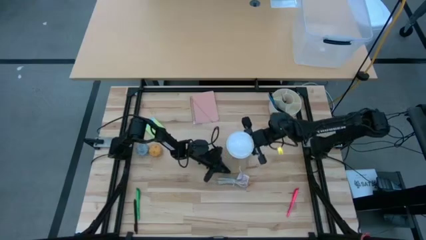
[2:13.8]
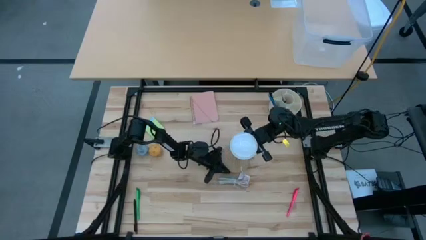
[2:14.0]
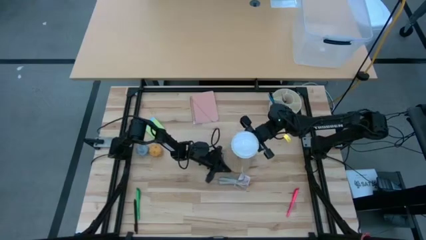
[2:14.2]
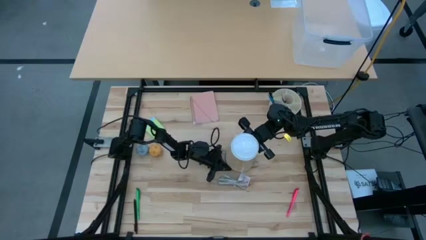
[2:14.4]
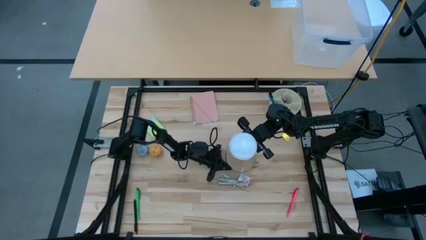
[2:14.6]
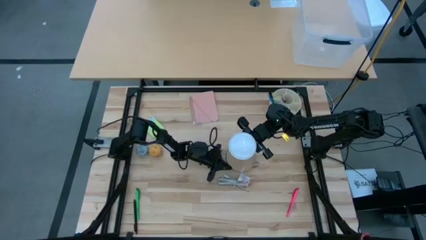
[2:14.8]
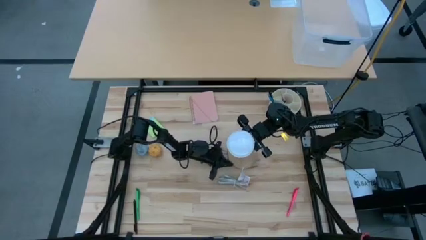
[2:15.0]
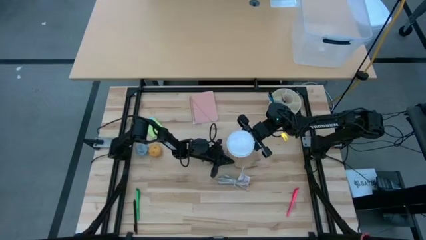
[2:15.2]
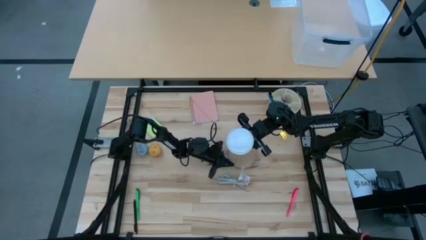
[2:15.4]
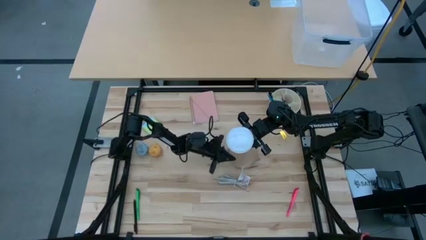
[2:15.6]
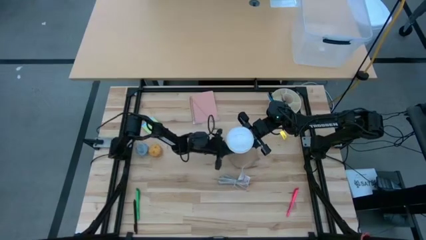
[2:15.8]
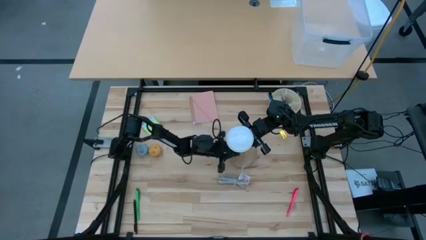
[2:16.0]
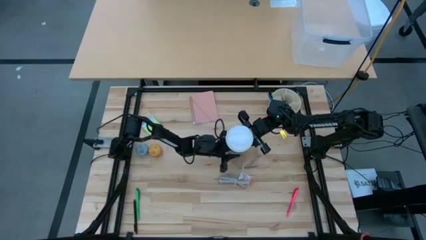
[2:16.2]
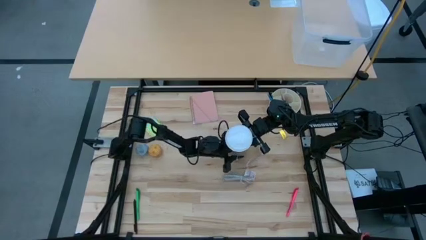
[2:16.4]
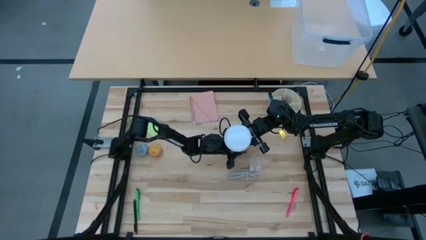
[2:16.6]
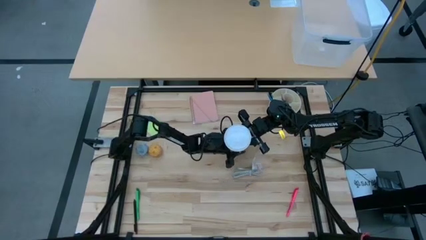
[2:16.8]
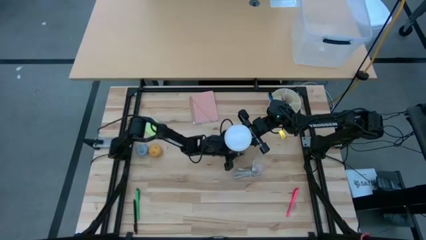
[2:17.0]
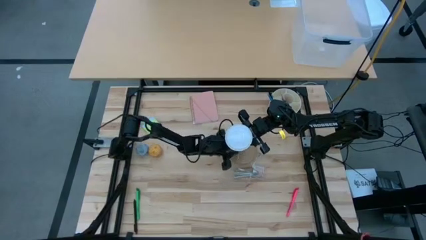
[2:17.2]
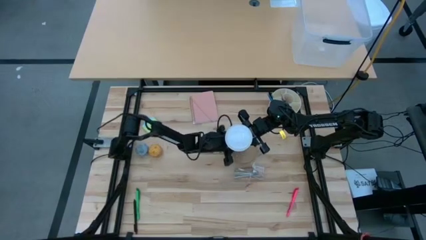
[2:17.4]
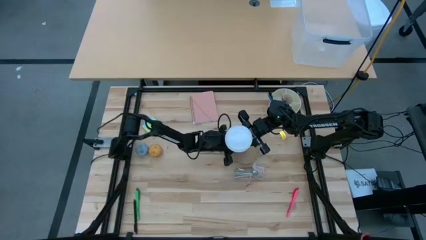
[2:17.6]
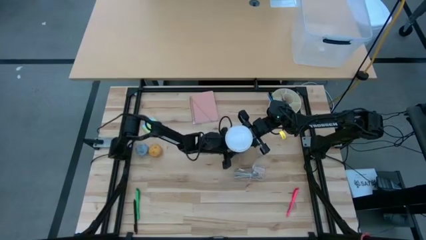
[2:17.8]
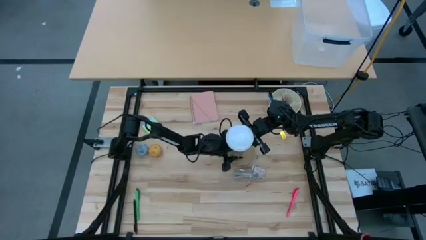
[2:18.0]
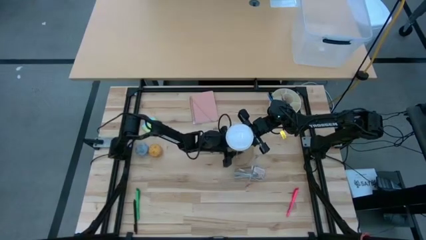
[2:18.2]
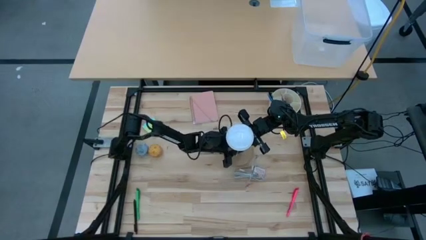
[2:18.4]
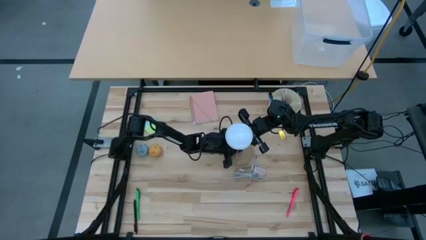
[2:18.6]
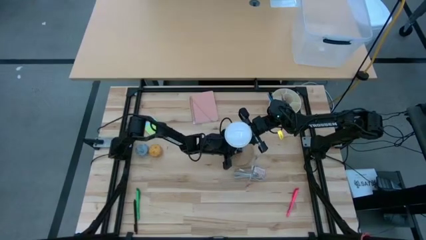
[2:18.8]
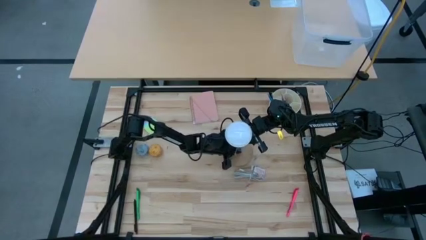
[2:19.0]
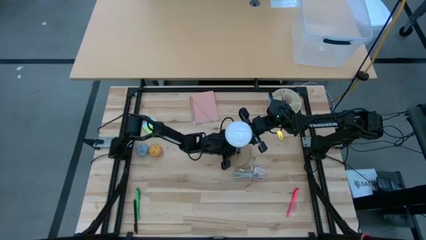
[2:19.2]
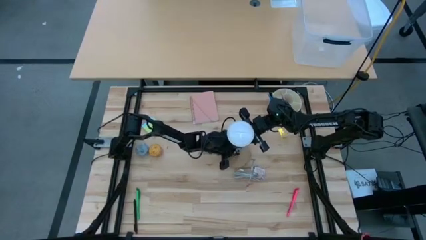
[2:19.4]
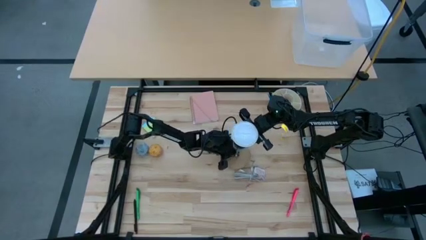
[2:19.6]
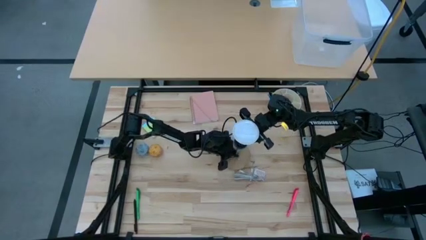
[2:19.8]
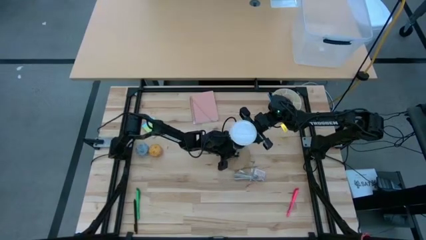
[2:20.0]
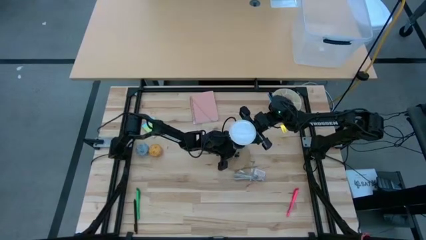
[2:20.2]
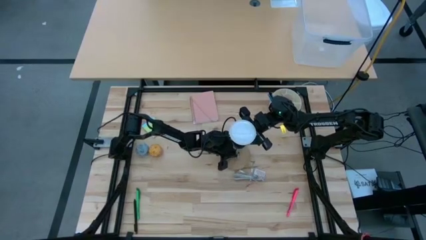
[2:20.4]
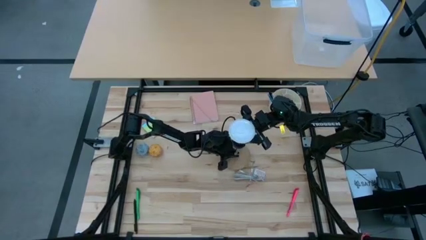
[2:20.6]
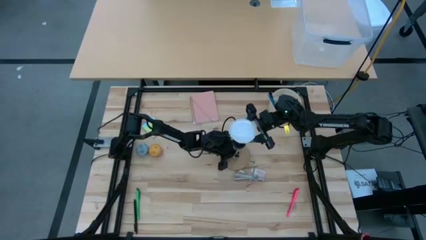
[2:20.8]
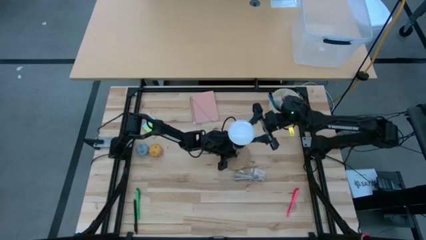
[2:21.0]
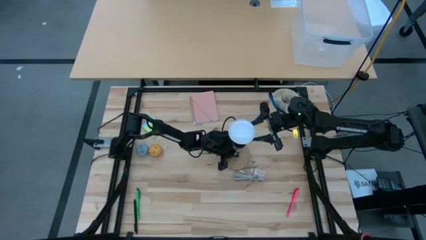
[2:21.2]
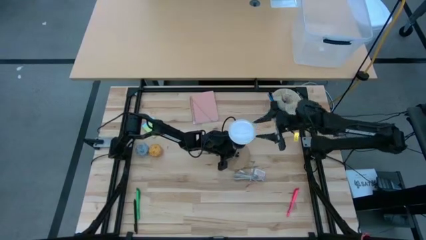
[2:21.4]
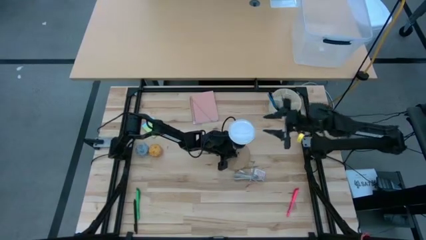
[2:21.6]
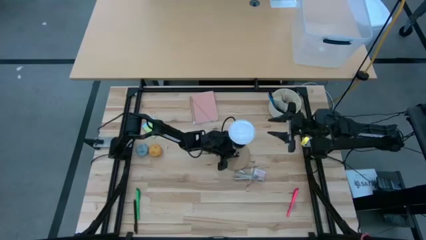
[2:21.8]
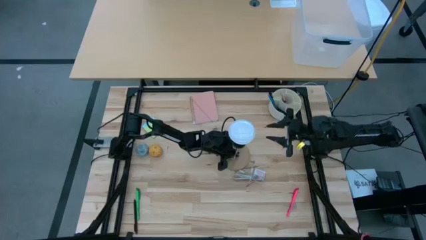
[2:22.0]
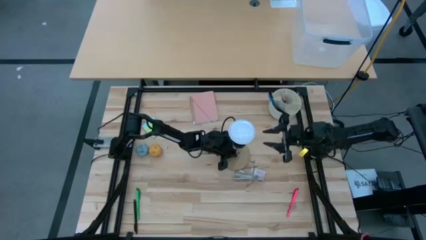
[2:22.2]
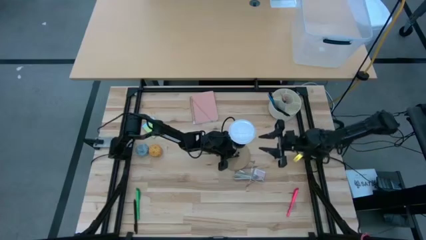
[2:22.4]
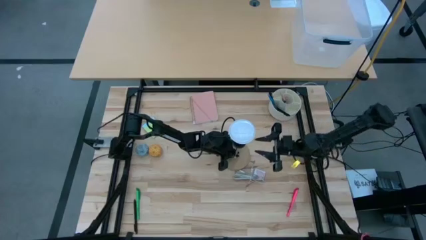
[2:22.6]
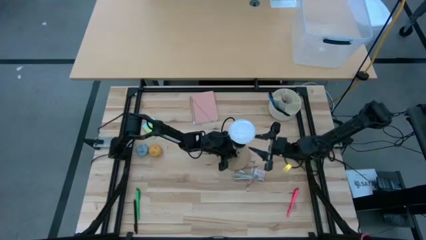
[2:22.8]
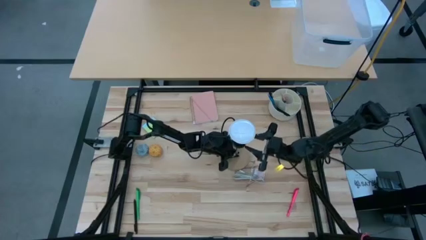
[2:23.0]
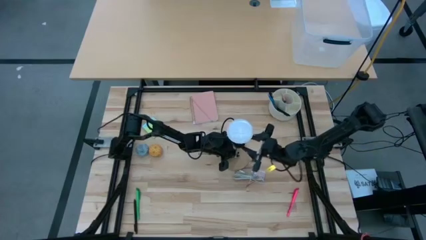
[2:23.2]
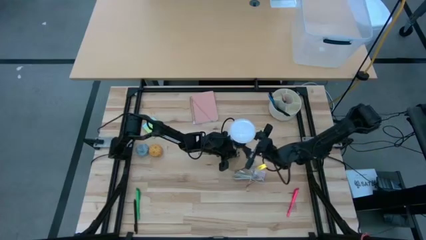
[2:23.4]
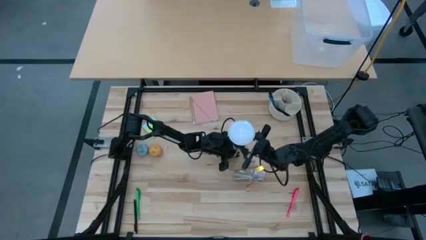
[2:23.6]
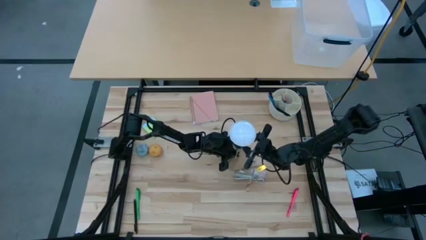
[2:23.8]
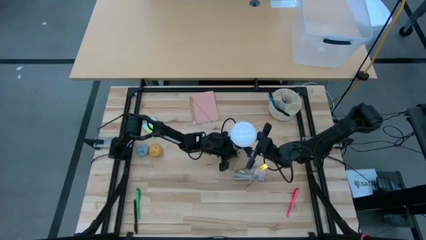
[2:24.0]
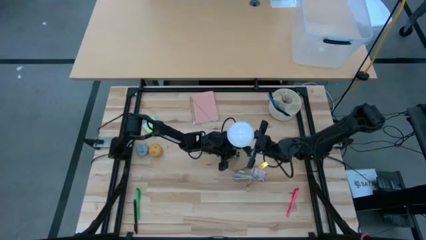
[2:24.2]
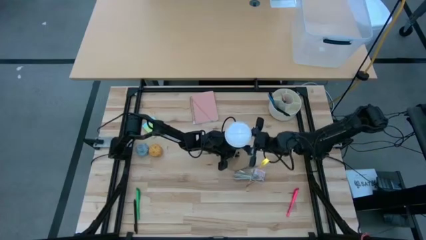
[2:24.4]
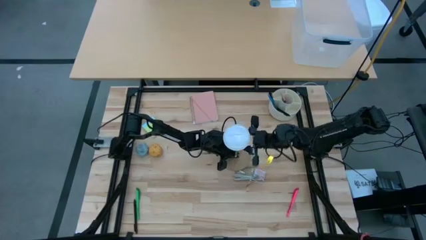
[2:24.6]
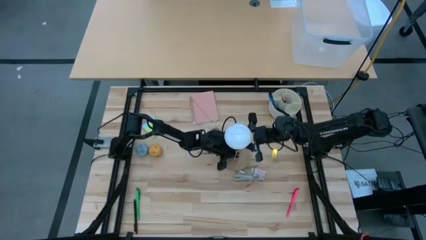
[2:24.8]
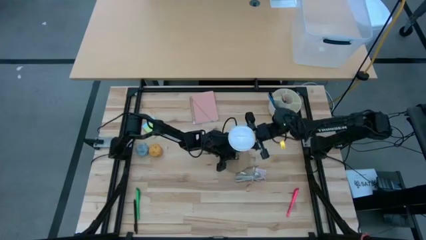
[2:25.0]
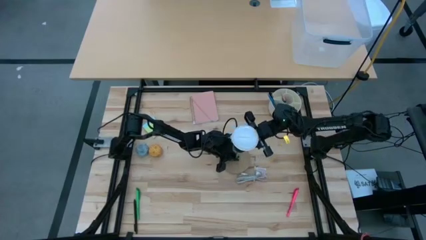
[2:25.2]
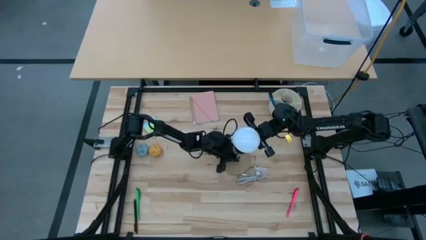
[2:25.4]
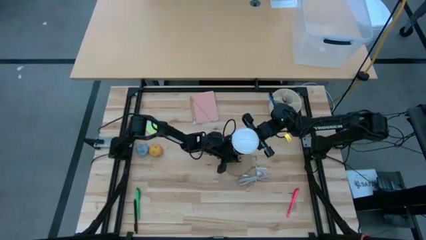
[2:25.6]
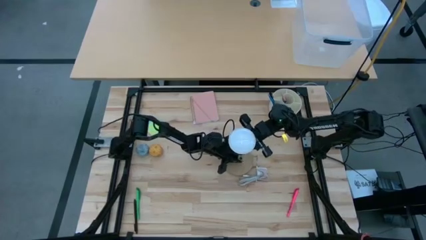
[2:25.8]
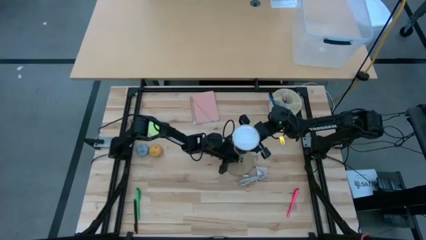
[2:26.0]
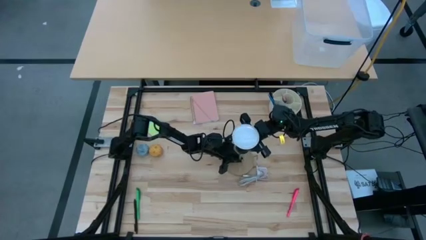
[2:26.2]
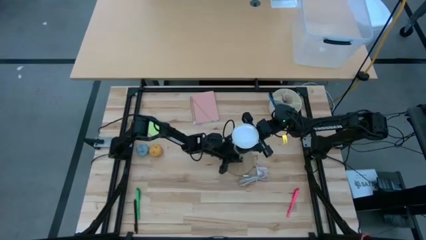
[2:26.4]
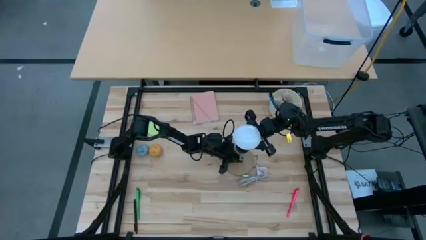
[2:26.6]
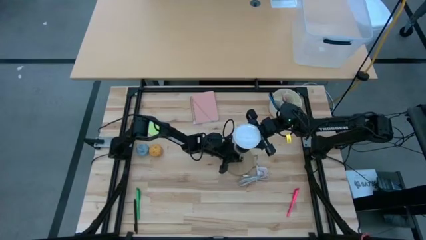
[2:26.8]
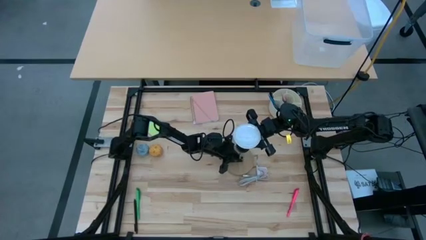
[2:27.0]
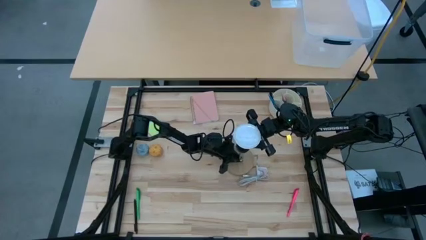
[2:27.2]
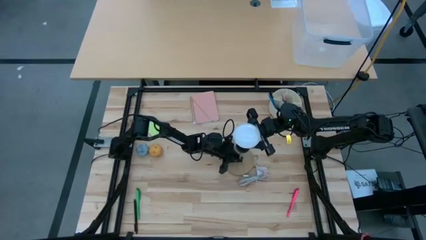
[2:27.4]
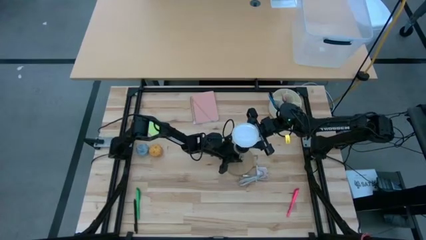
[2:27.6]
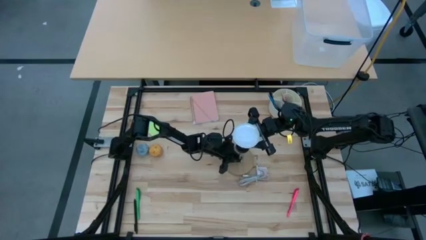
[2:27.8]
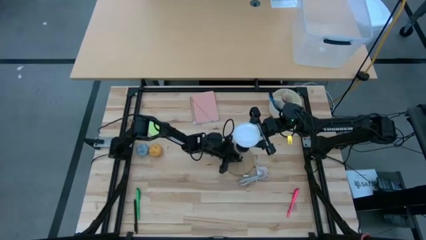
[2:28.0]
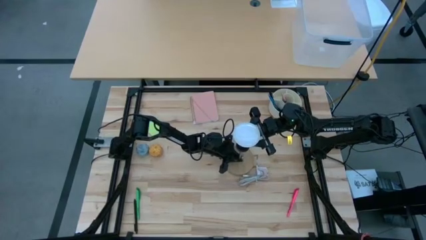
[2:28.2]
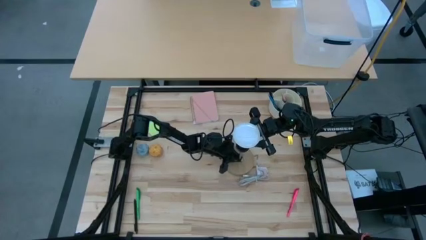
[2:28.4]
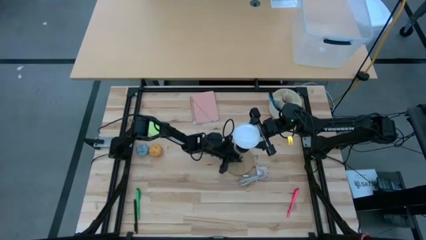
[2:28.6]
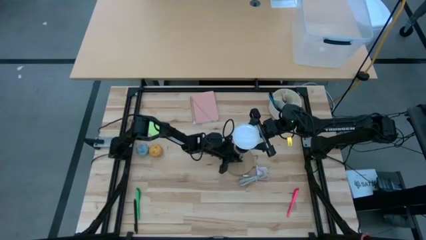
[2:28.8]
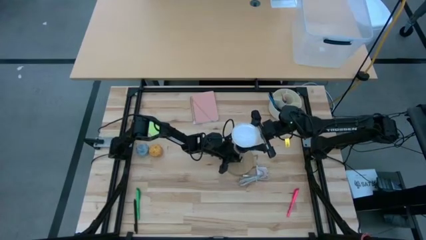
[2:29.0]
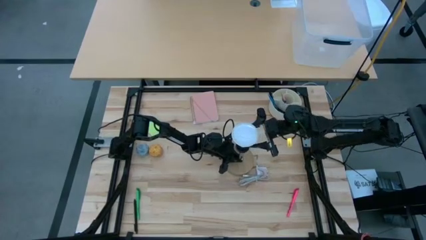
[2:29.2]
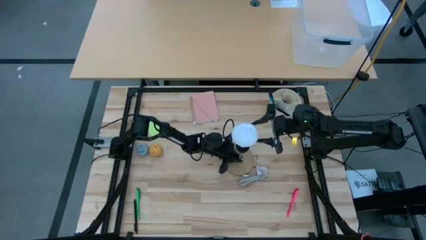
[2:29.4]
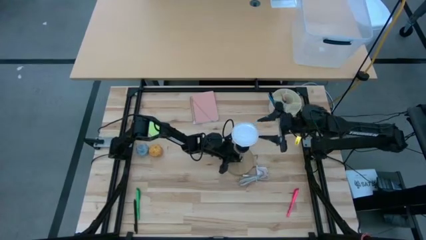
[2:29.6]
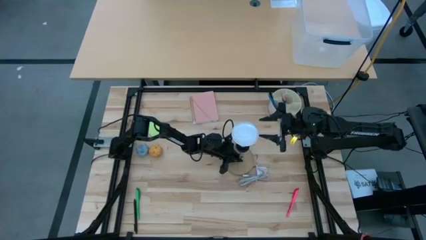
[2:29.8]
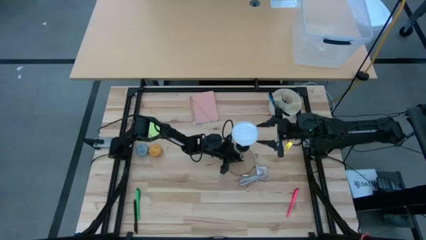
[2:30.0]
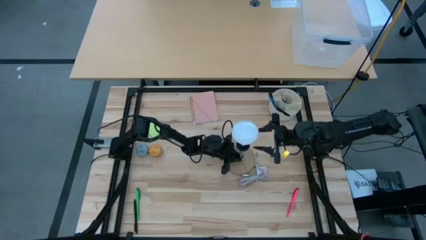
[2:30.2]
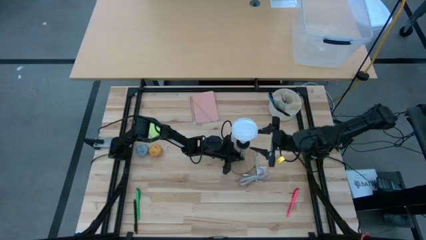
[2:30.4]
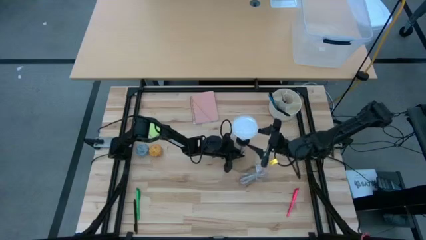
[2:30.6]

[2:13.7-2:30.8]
Task: Screw lightbulb
Remove the lightbulb from the lamp
